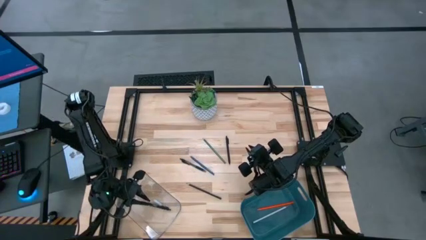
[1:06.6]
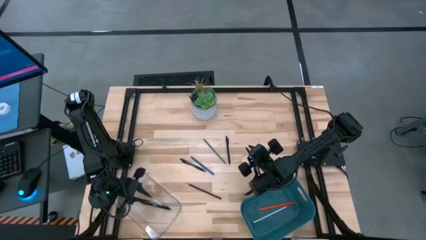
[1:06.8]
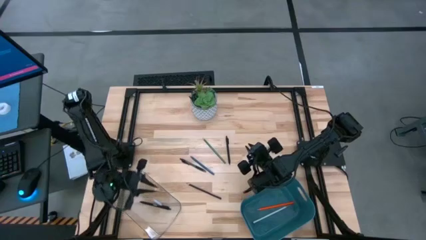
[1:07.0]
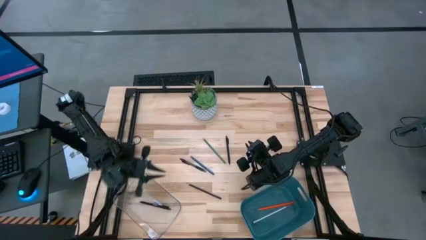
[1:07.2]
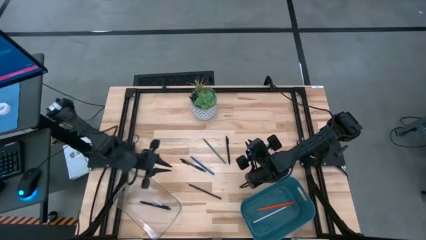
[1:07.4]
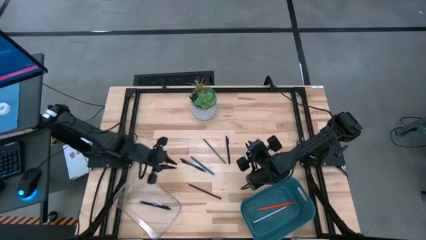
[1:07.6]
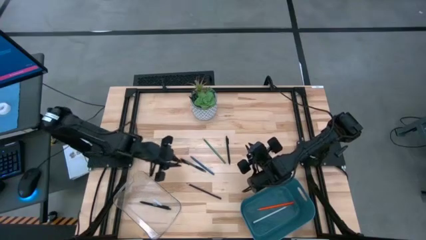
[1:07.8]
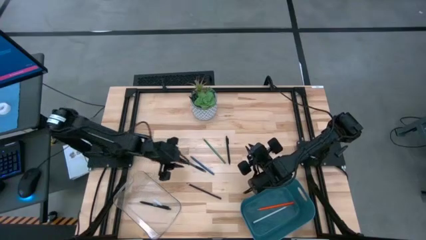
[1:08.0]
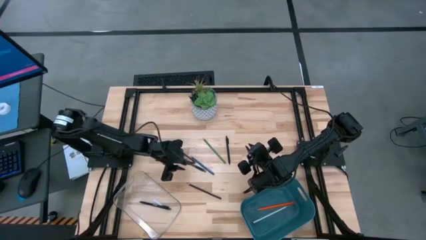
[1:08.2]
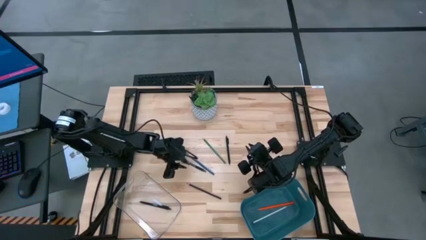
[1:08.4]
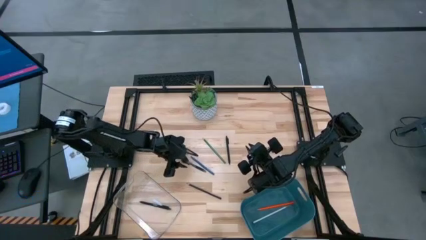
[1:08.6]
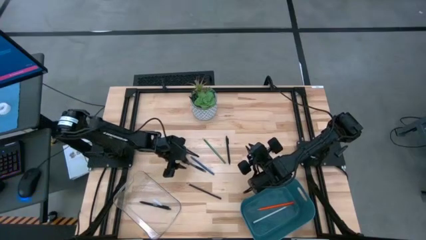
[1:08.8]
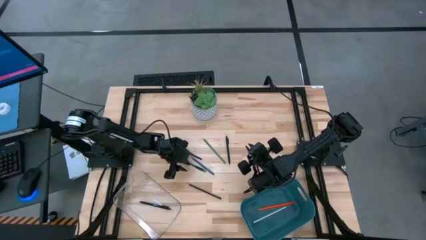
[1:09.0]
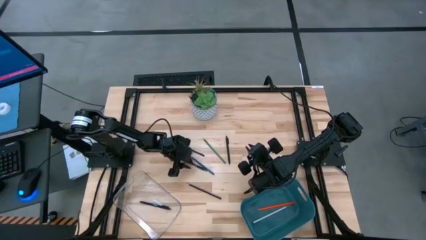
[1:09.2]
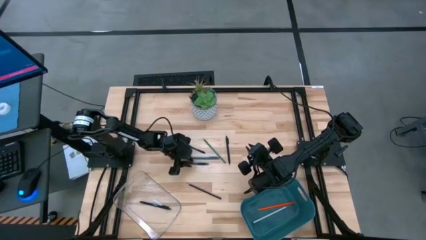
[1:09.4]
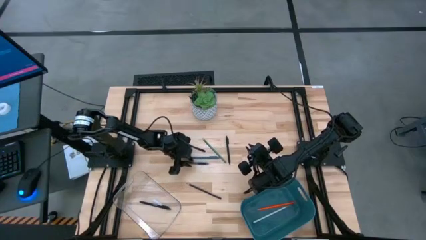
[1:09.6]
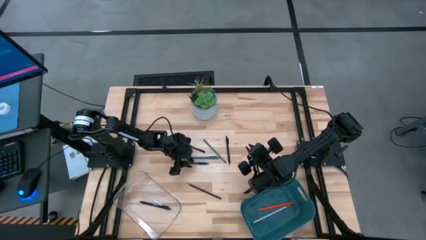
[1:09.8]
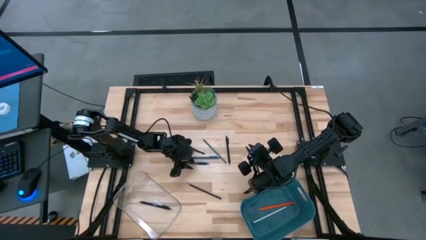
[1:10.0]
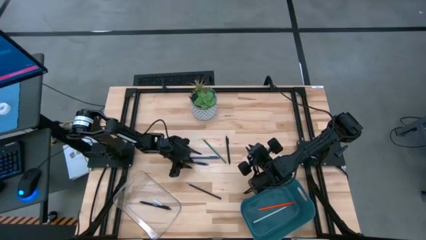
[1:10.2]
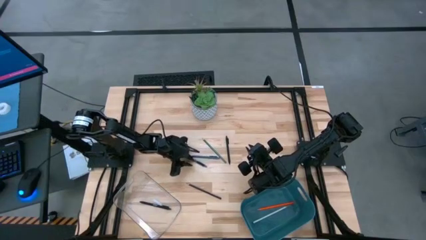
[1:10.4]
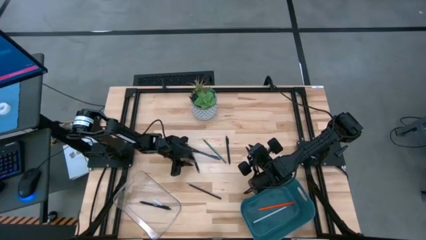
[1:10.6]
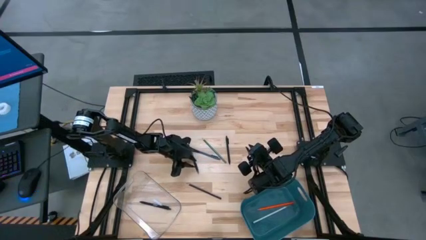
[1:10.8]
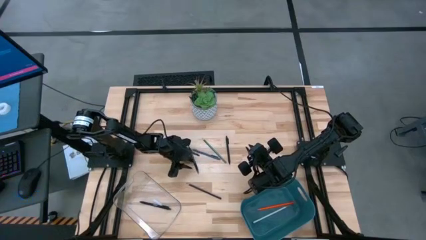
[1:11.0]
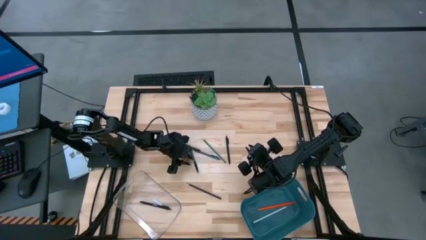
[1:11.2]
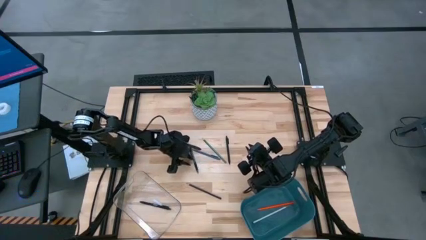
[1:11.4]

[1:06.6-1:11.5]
Task: Sort pens & pencils
Put the left black pen into the transparent bin

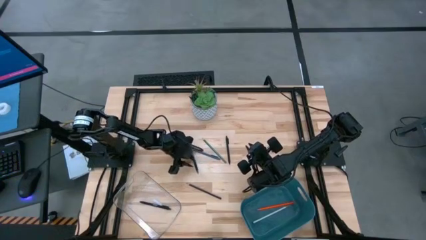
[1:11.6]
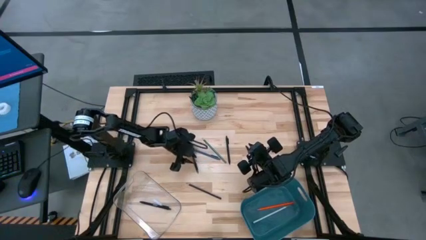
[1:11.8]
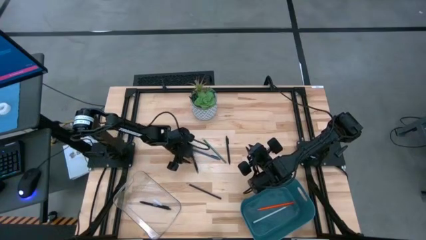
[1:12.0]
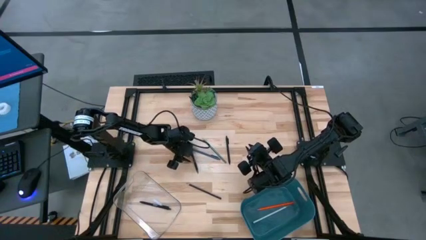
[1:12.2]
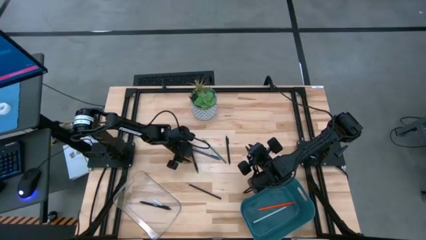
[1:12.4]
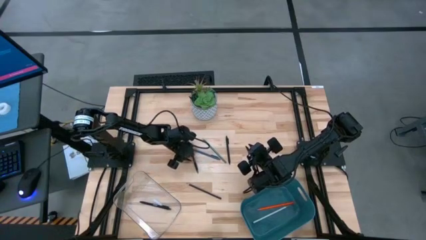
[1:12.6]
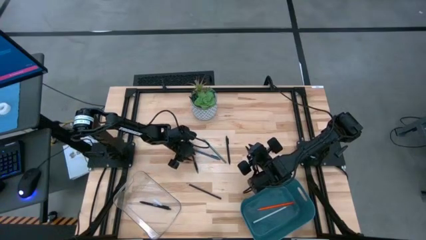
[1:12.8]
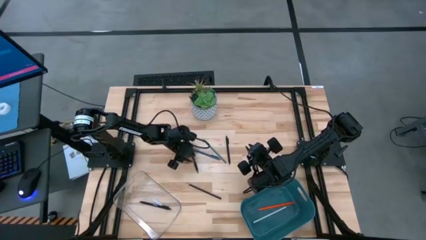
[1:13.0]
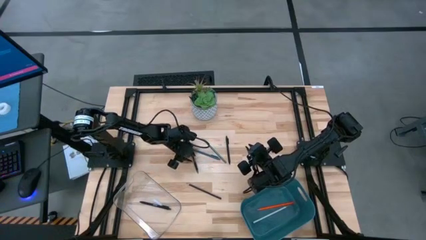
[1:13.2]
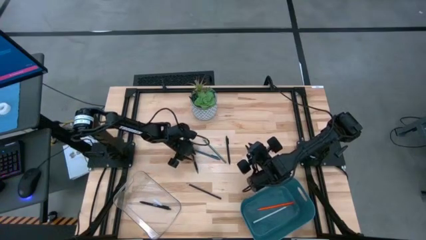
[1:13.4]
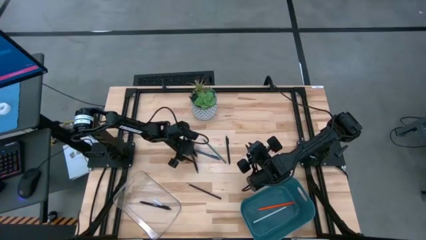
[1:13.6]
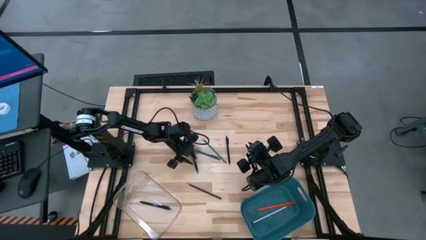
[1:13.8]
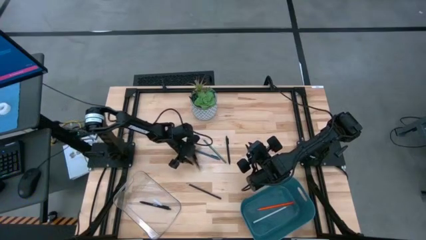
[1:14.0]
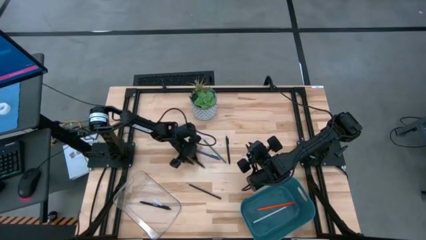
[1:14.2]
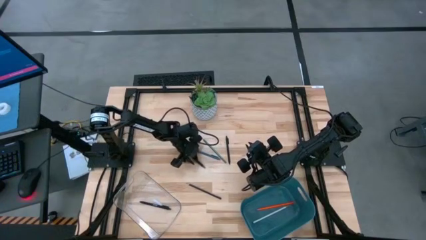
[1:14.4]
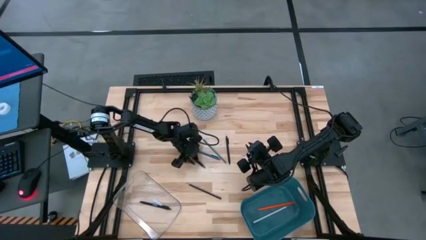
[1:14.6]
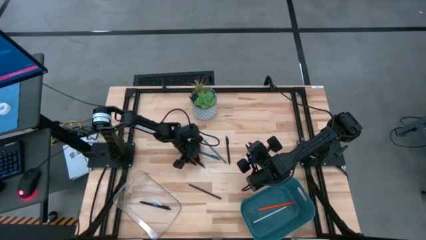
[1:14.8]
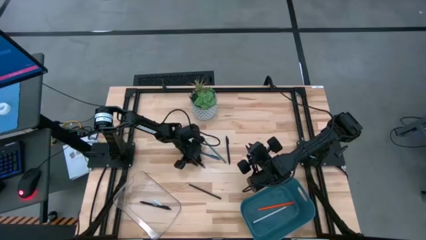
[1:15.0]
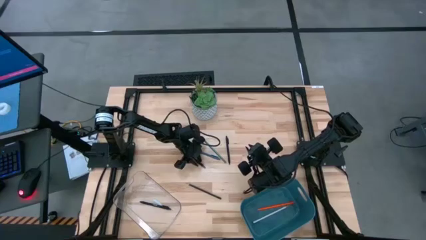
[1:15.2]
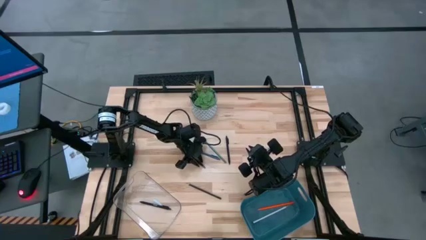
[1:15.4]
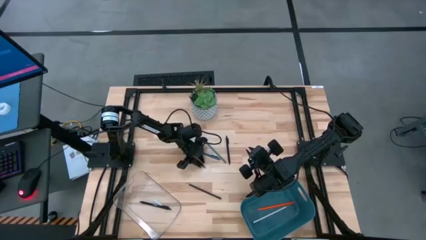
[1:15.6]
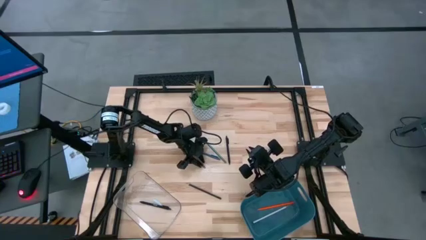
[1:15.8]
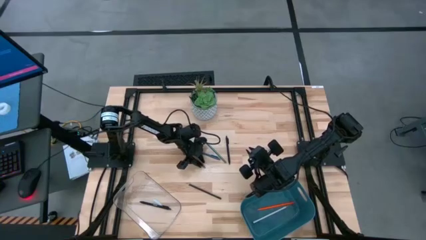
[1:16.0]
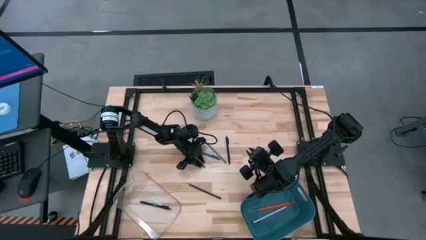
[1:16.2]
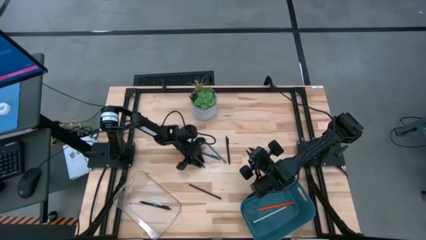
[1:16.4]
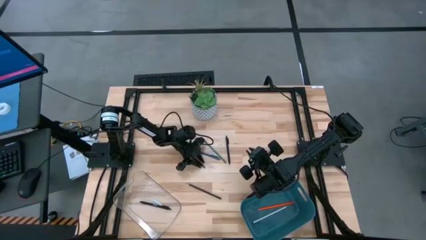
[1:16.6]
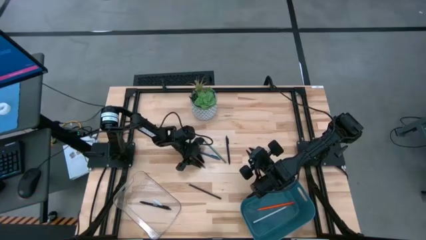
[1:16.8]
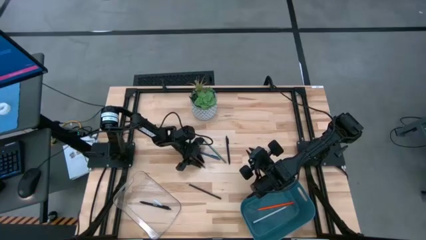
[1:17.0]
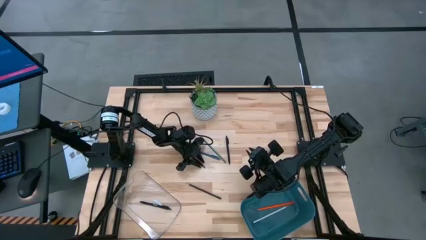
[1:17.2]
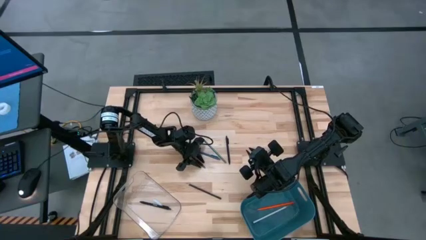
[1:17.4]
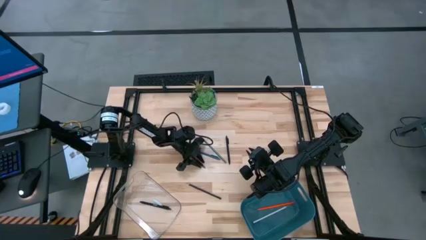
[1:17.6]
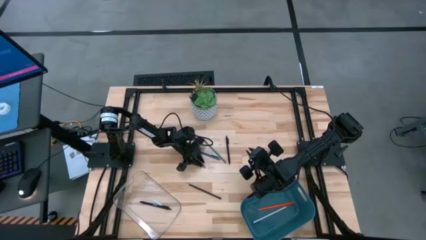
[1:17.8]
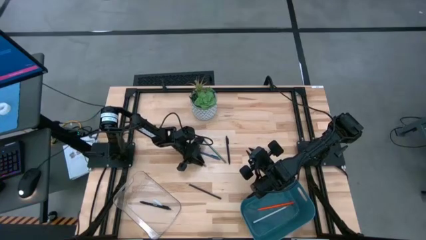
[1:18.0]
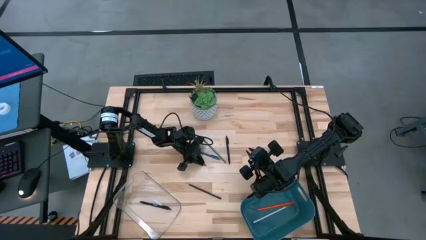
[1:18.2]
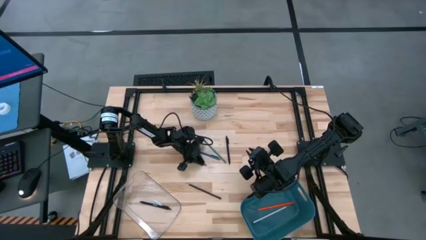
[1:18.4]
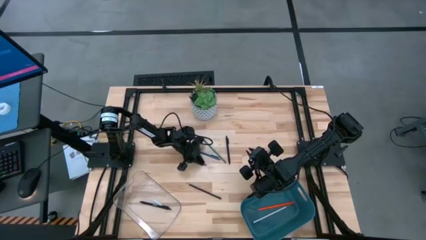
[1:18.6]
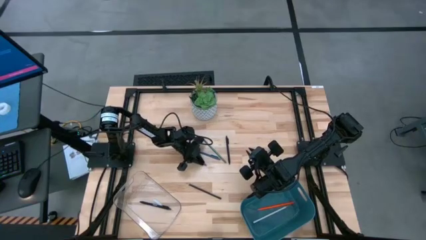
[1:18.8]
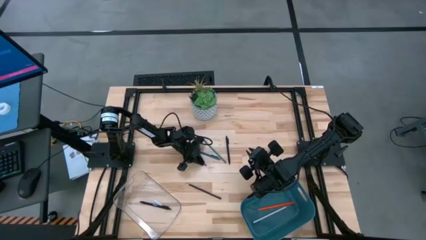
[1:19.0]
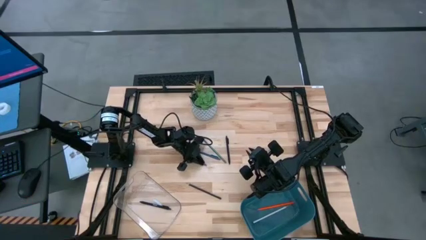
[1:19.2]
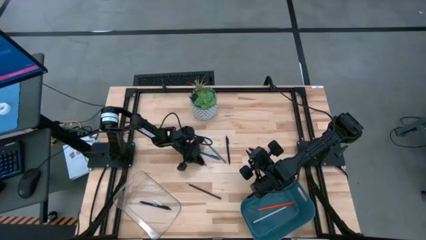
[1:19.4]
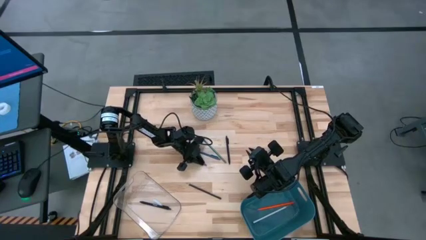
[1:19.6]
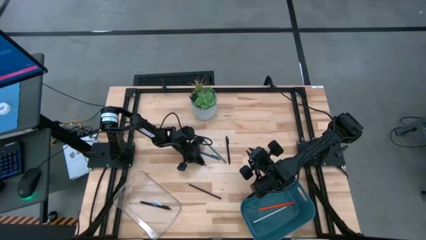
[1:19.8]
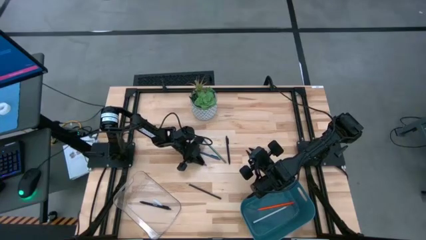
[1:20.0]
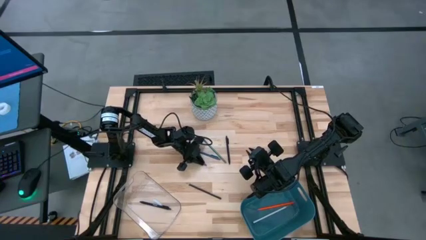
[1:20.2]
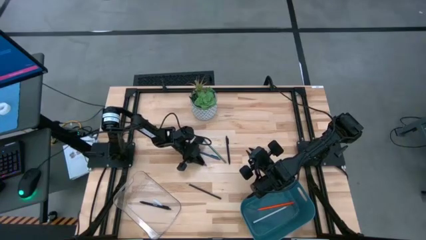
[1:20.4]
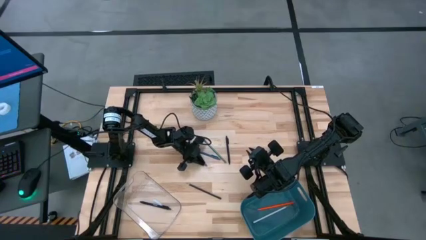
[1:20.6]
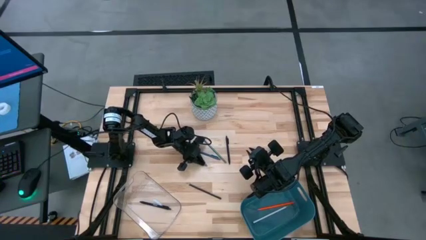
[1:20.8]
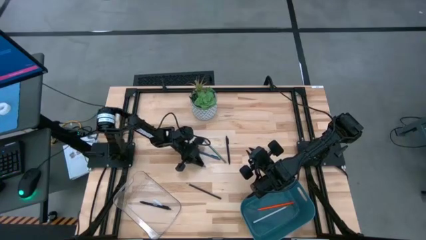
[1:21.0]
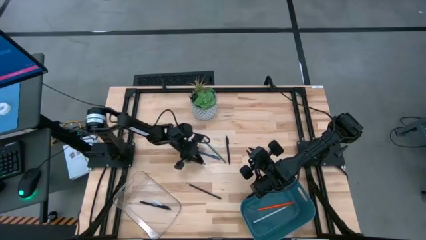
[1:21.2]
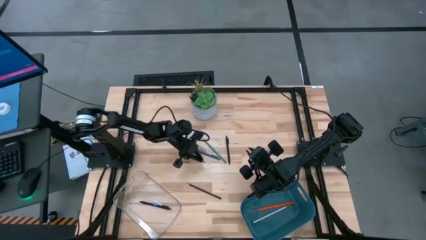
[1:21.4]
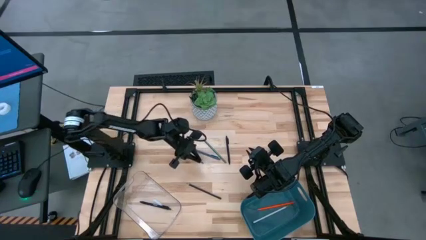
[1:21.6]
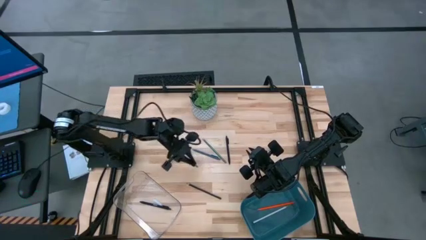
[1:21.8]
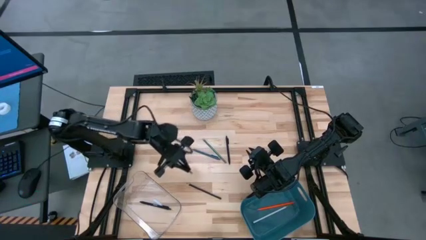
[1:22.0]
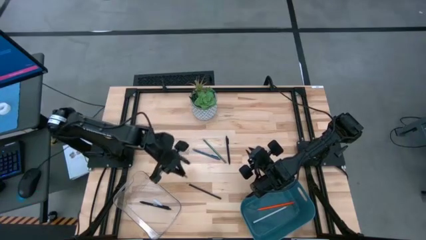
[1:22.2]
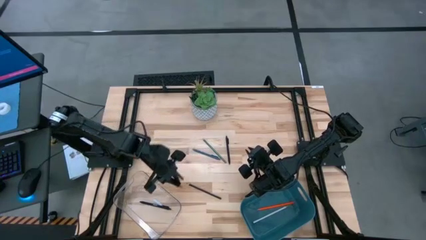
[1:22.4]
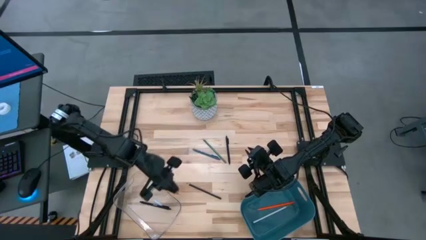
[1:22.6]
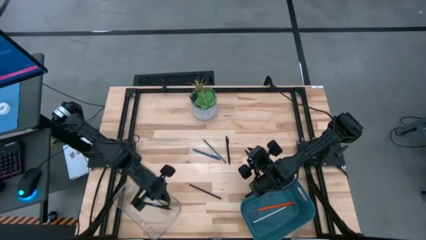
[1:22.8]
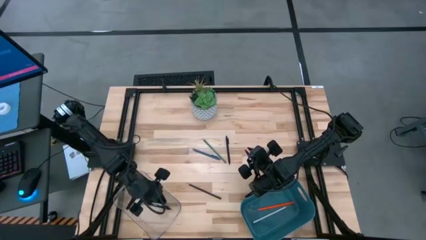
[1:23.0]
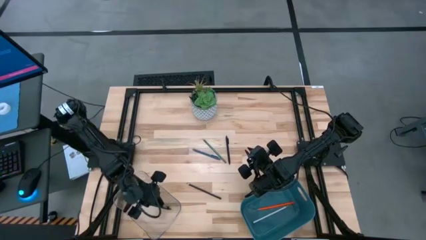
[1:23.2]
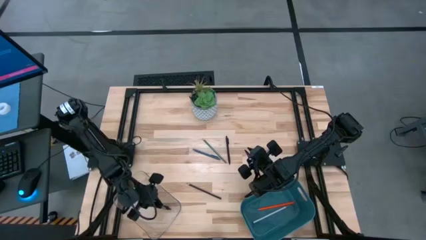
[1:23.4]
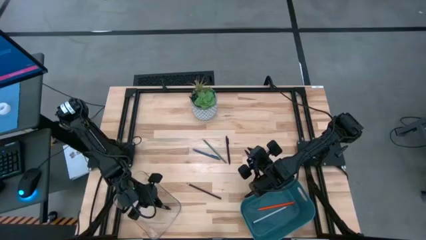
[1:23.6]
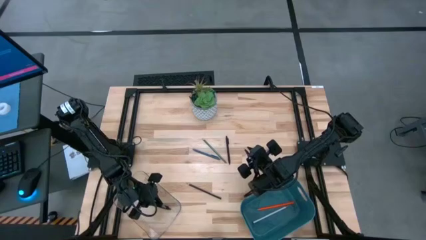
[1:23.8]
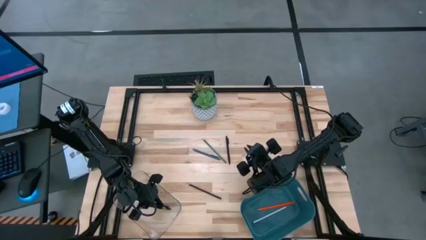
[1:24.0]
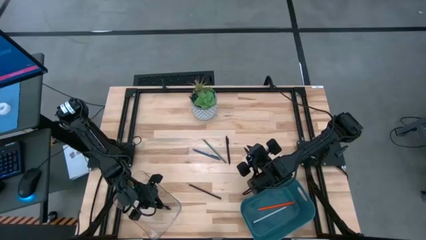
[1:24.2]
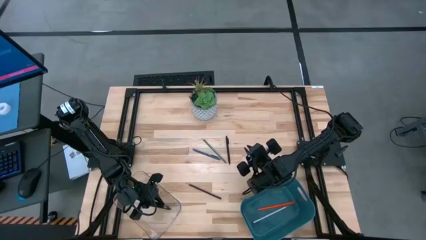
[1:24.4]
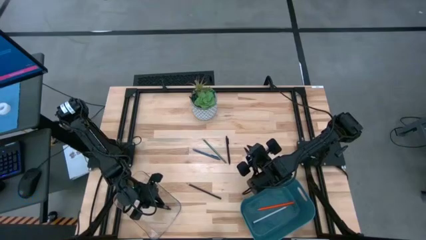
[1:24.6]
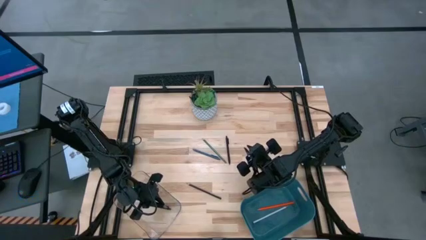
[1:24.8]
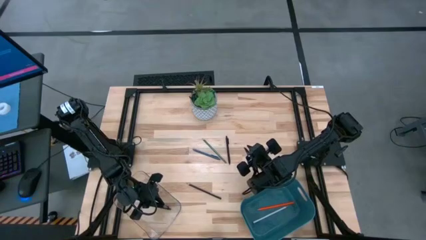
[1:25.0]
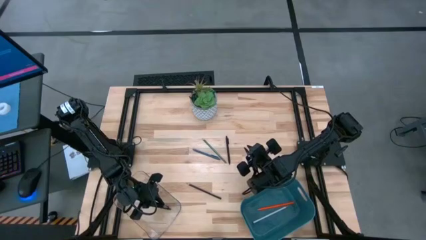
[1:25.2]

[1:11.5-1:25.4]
Put the left black pen into the transparent bin
